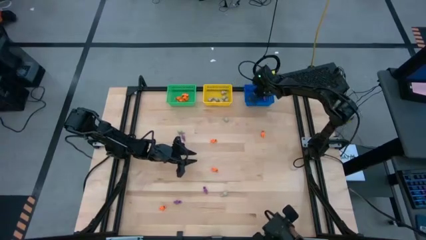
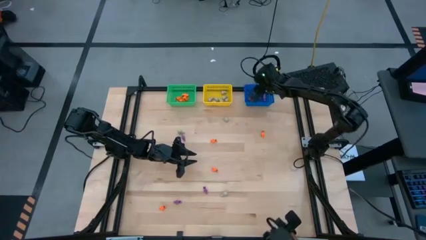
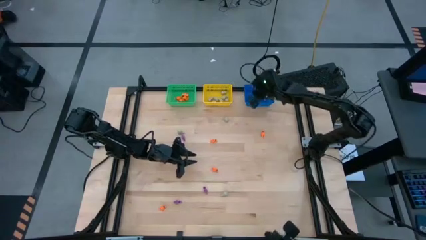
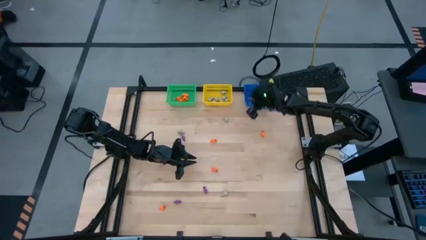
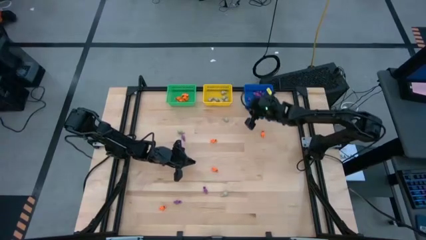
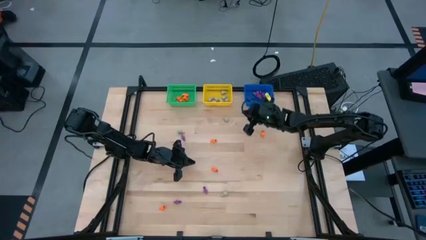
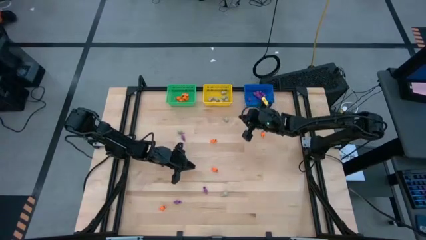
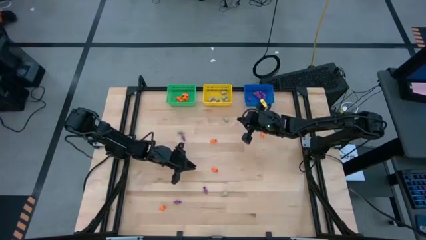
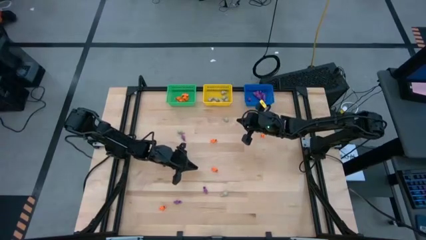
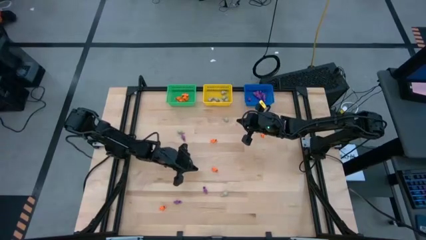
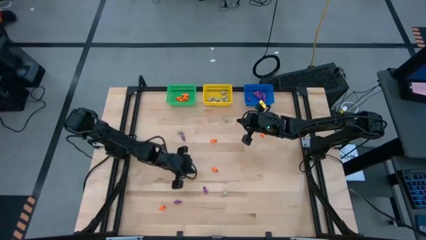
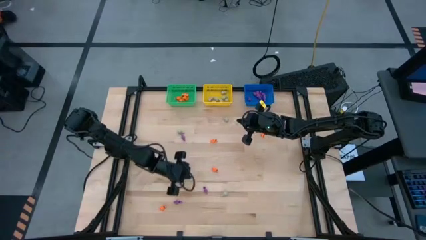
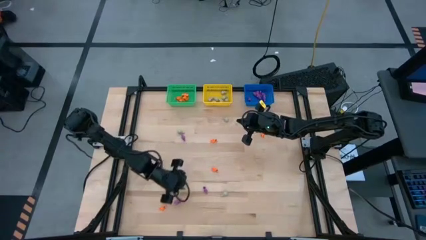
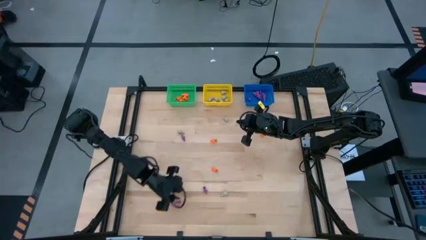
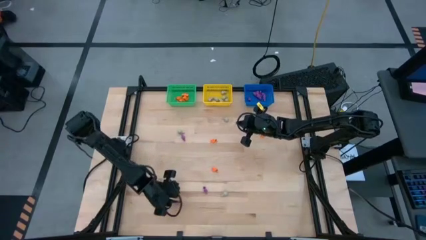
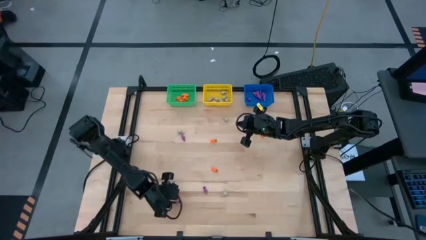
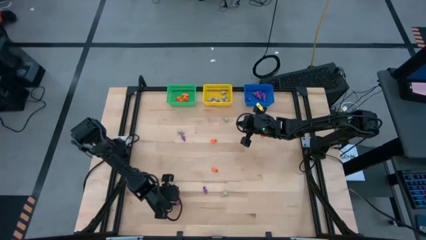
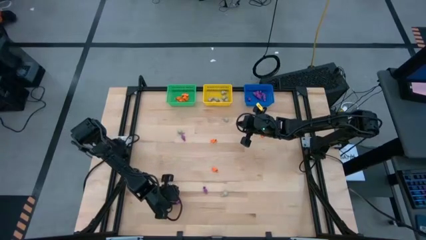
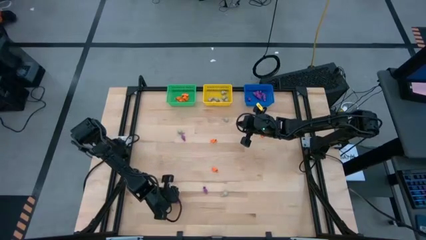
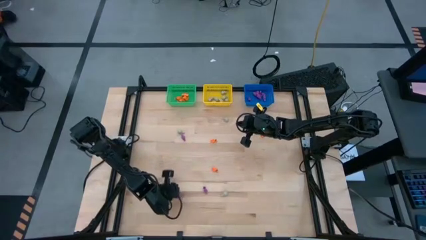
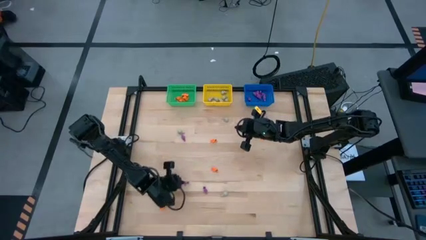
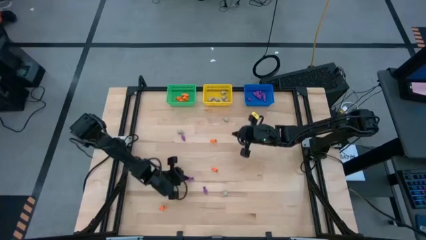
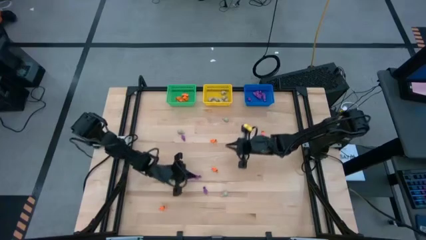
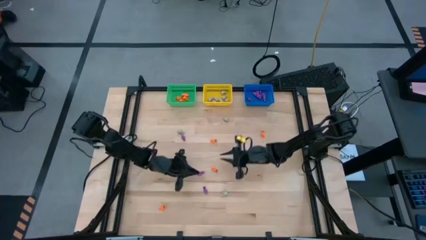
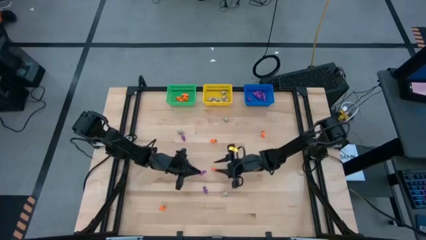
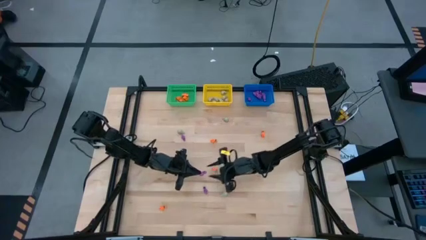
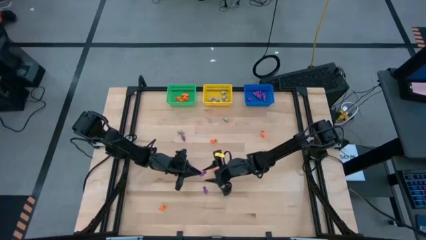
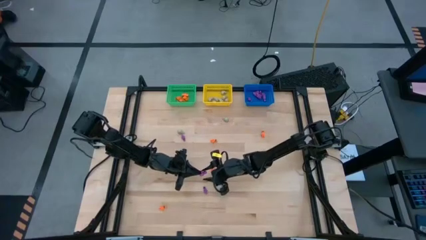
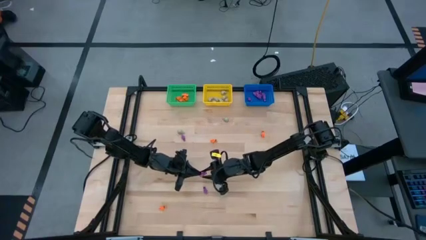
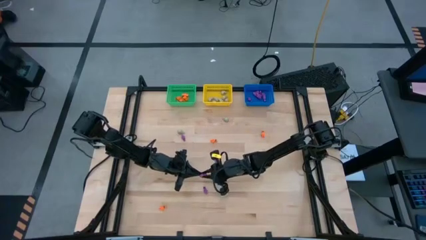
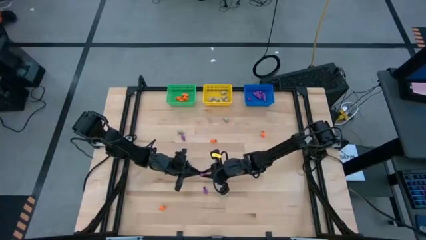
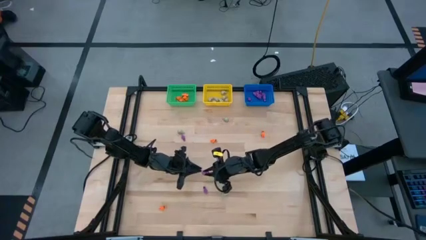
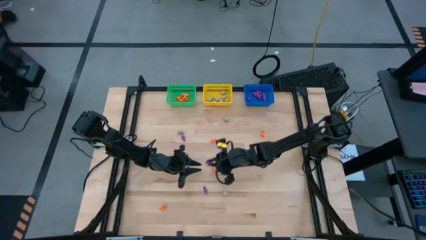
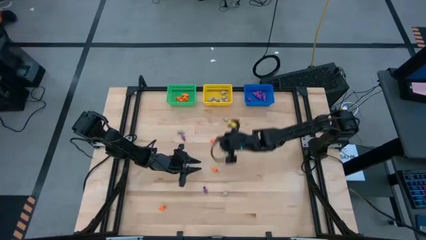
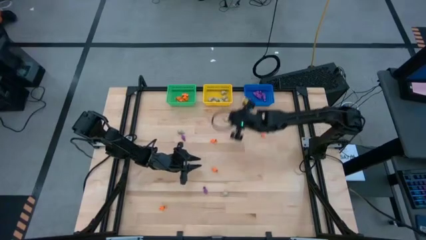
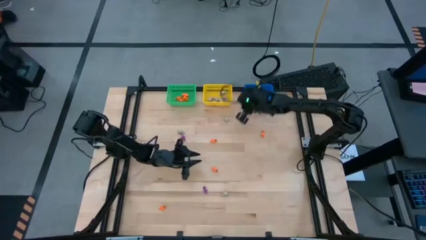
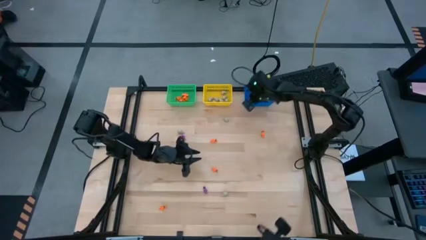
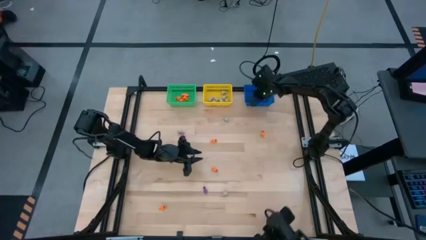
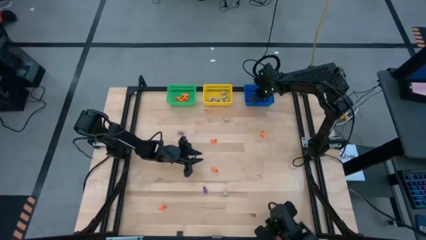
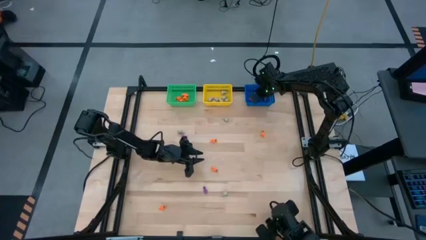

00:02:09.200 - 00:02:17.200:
Task: Sort Halloween decoration
Put the violet skeleton toy into the blue bin

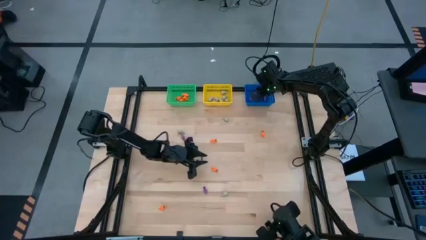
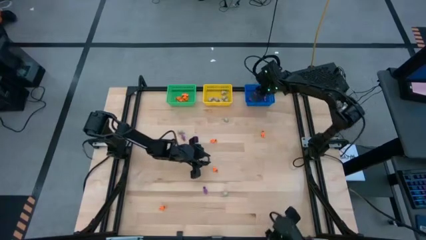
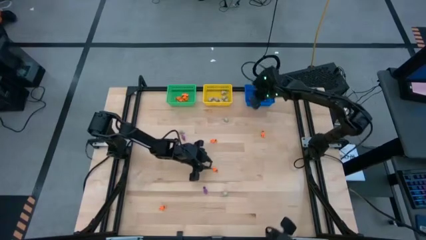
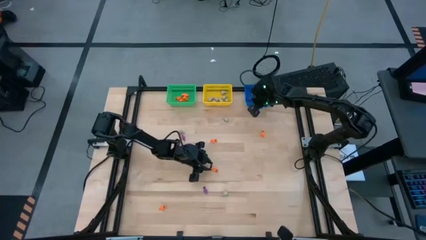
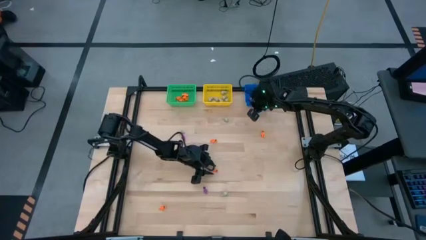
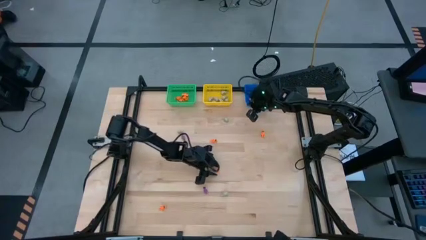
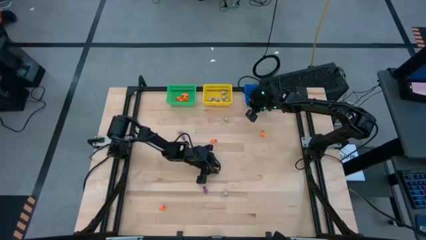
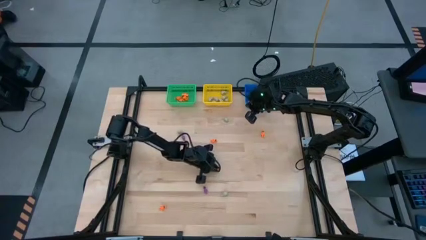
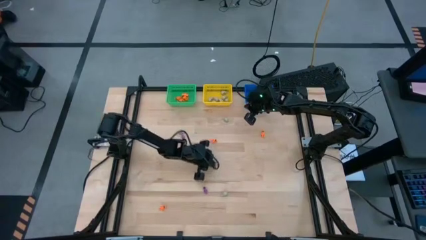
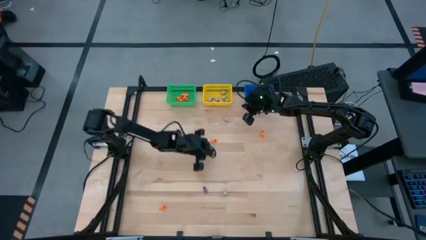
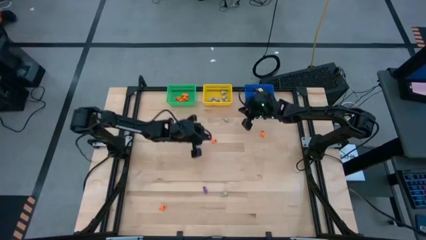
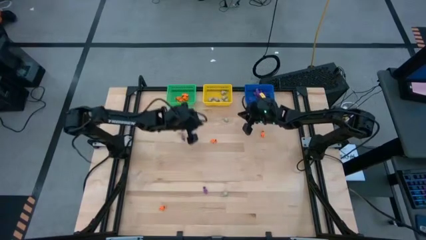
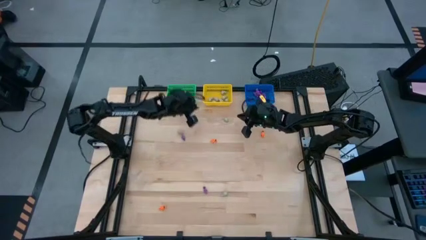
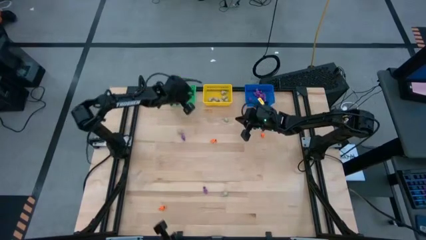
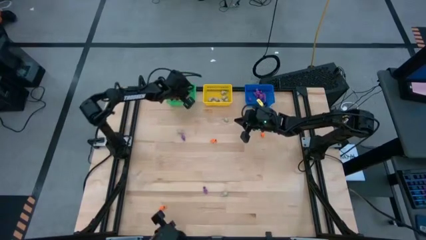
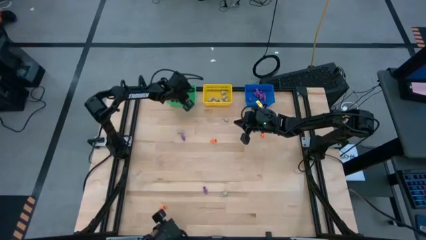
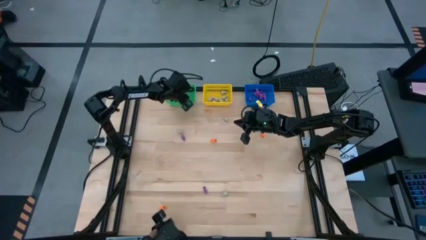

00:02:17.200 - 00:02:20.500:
Put the orange skeleton toy into the green bin

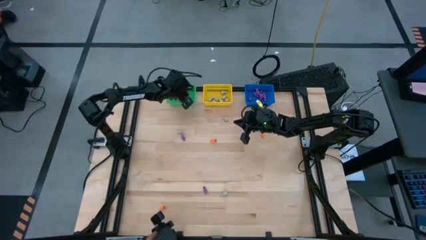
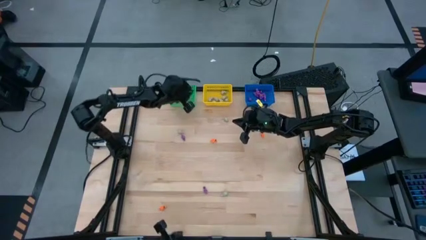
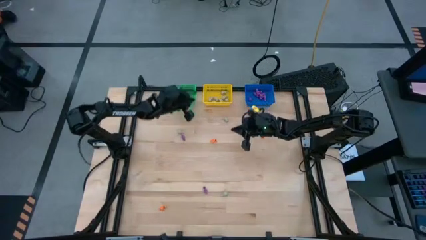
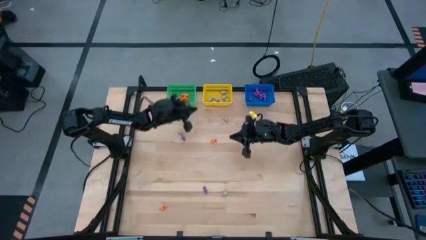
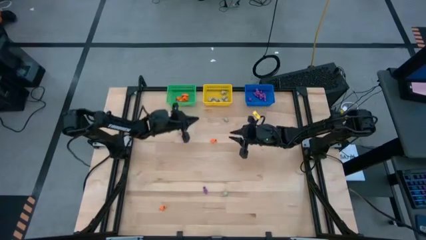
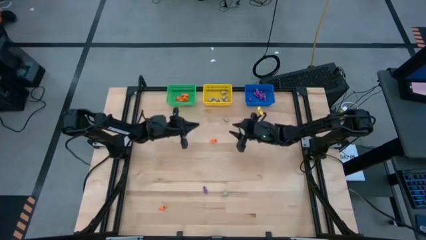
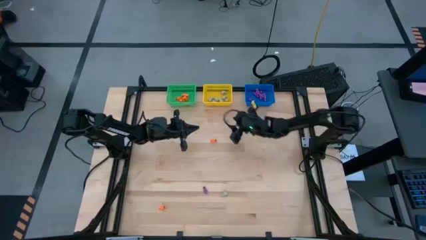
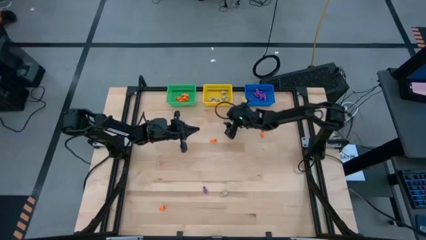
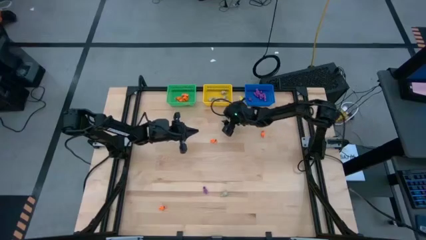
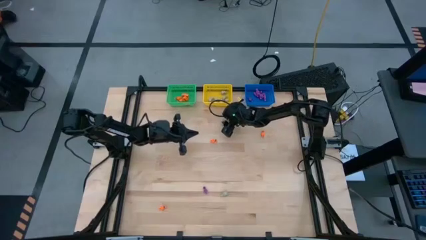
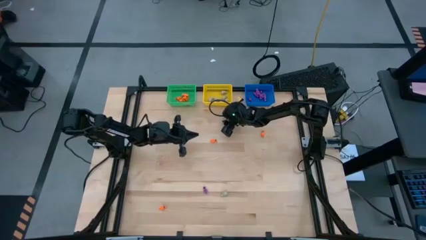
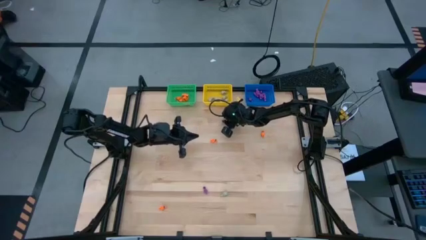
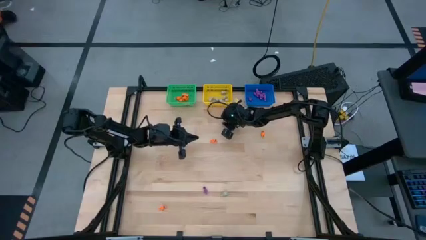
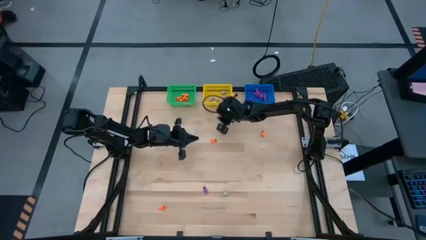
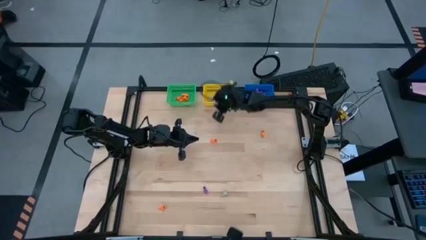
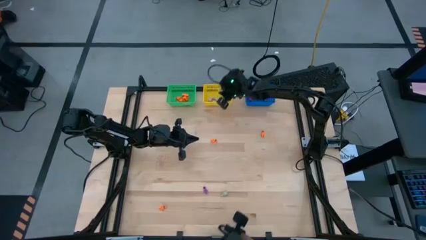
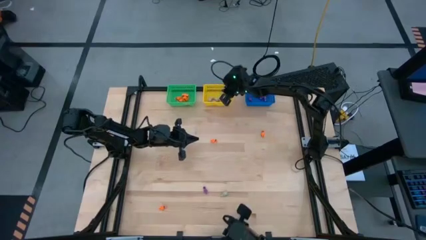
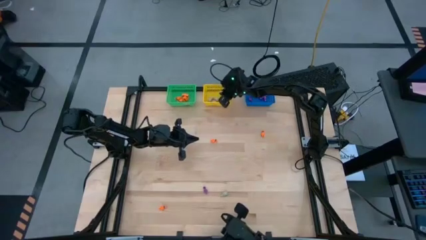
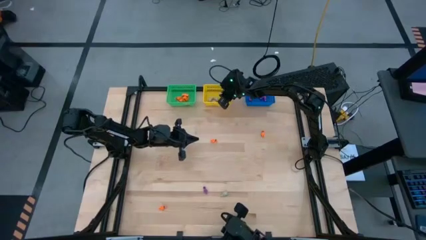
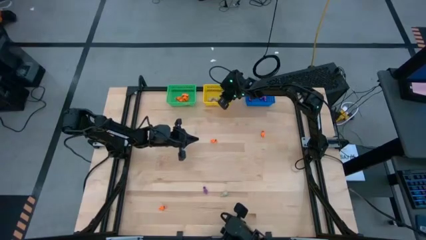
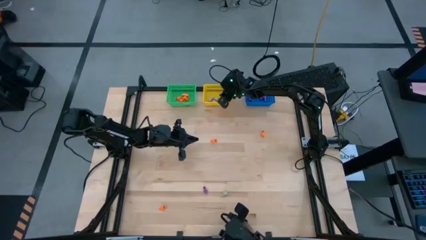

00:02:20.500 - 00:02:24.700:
Put the white skull toy into the yellow bin
